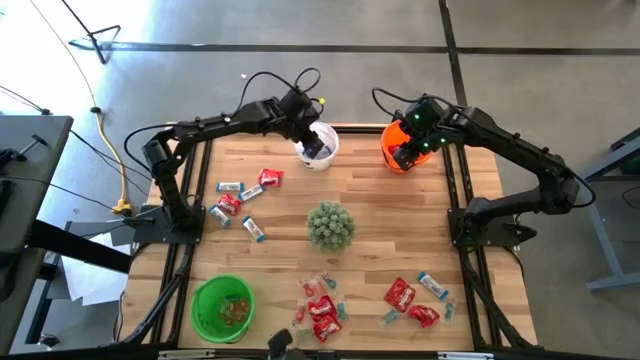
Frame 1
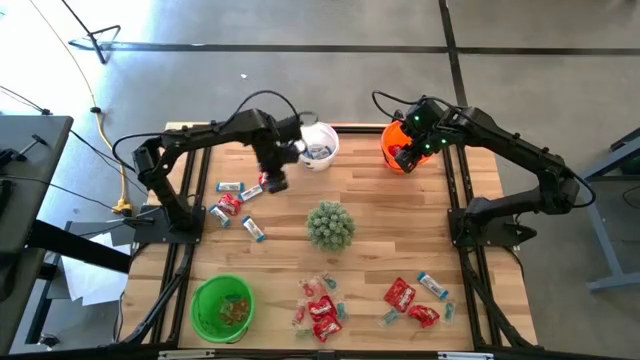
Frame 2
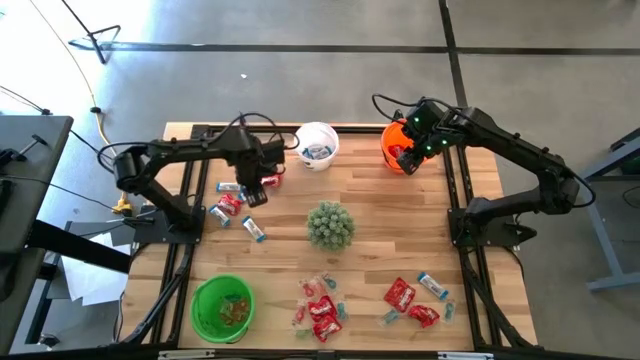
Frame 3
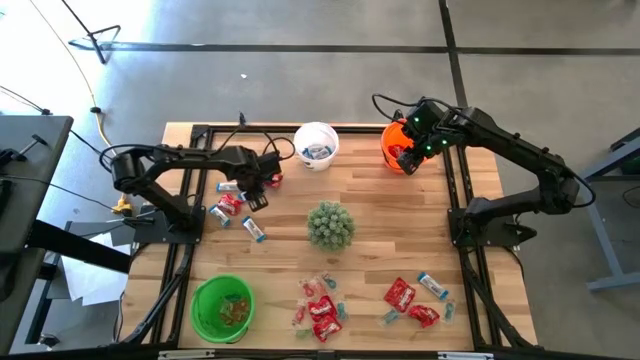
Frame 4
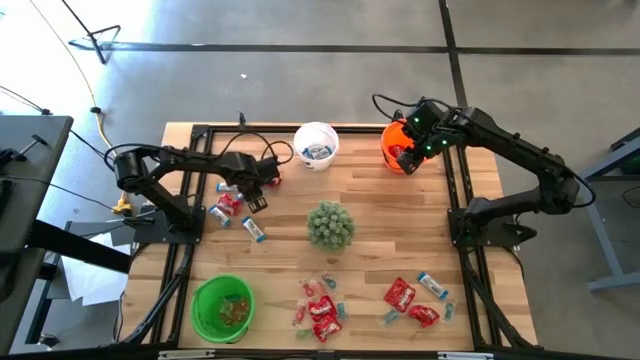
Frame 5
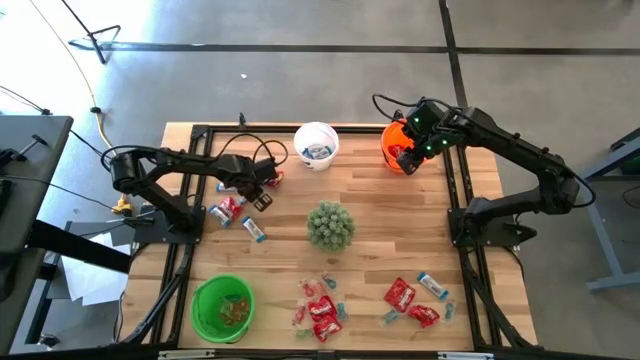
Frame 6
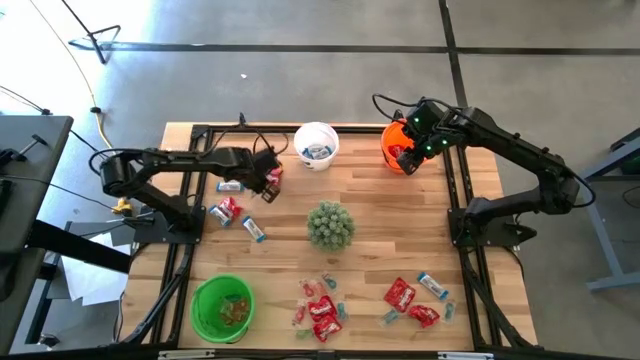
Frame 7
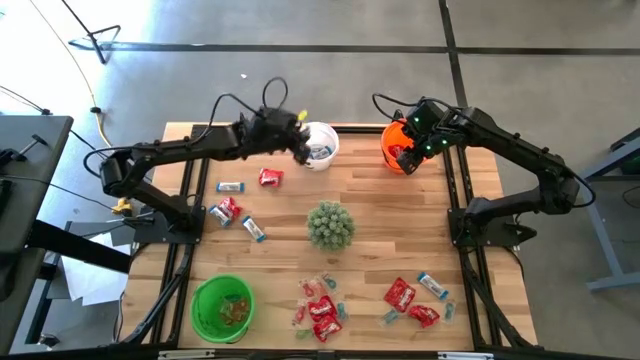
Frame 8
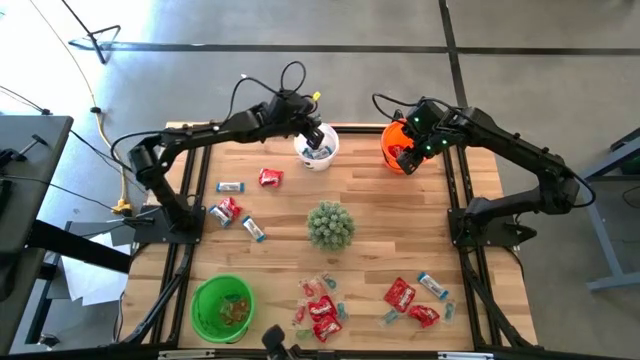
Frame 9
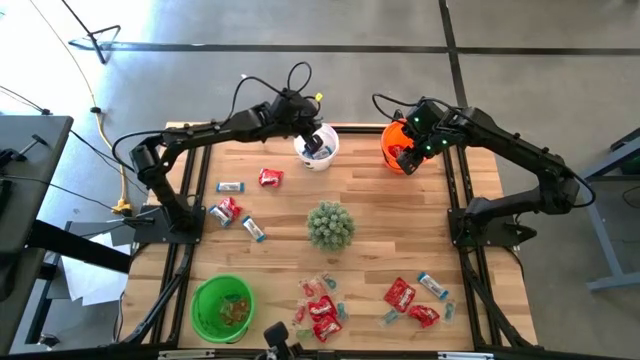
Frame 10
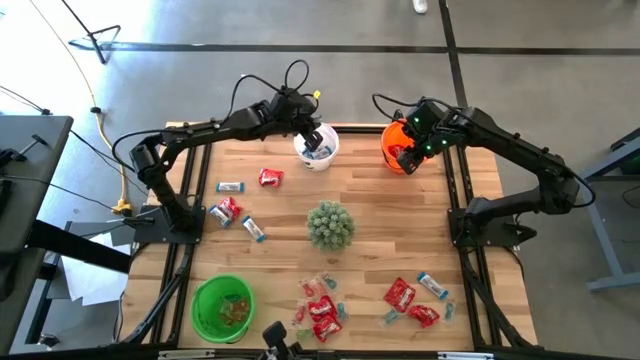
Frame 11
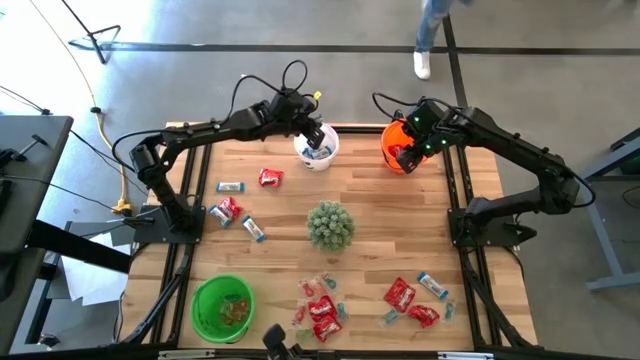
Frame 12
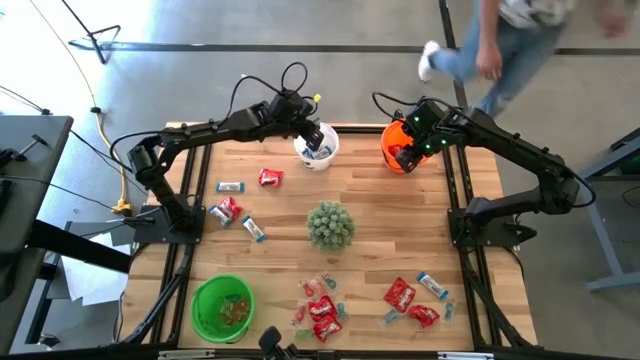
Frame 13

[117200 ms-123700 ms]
Task: Sort candy
Put the white chocolate into the white bucket

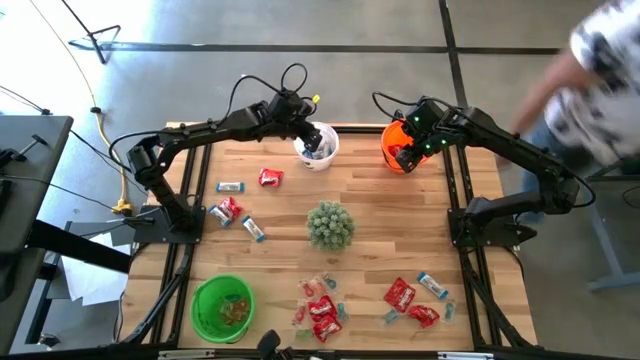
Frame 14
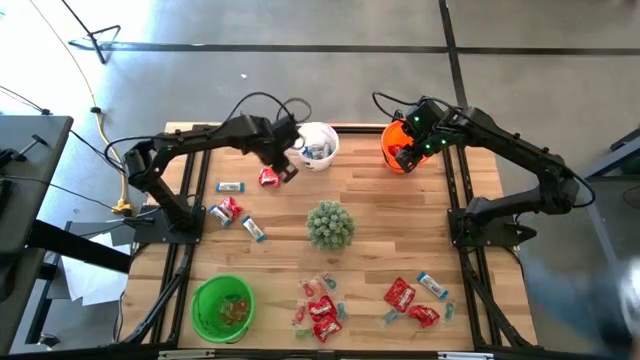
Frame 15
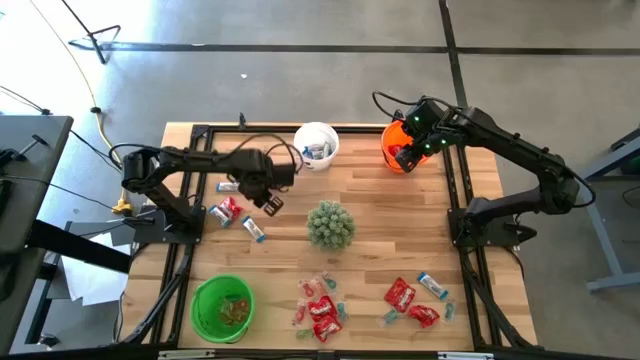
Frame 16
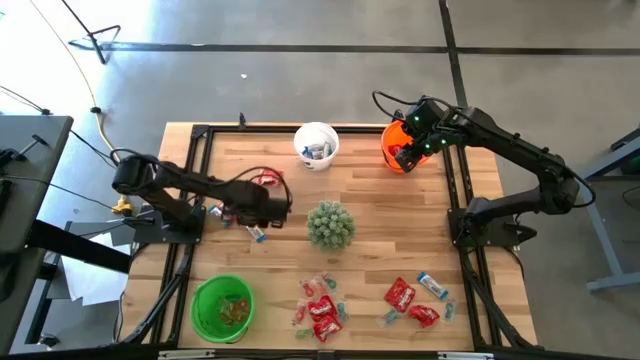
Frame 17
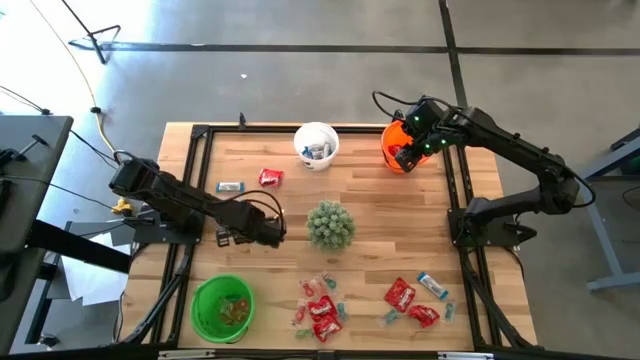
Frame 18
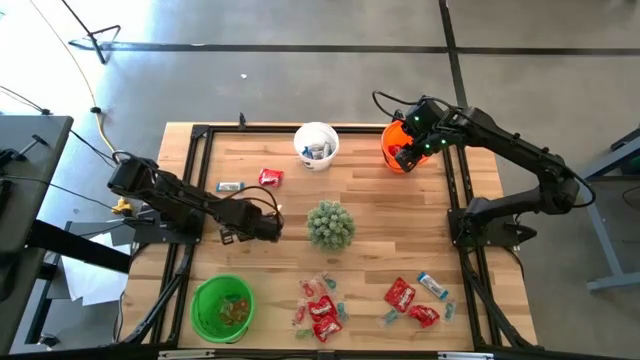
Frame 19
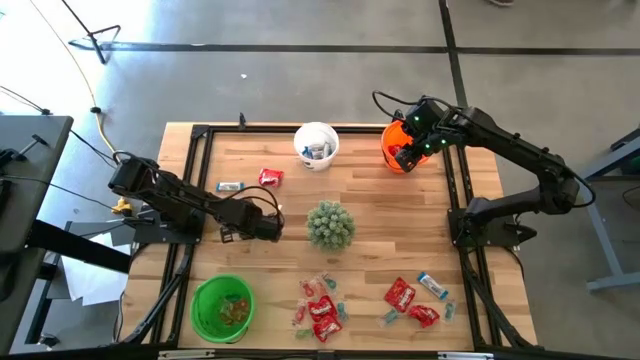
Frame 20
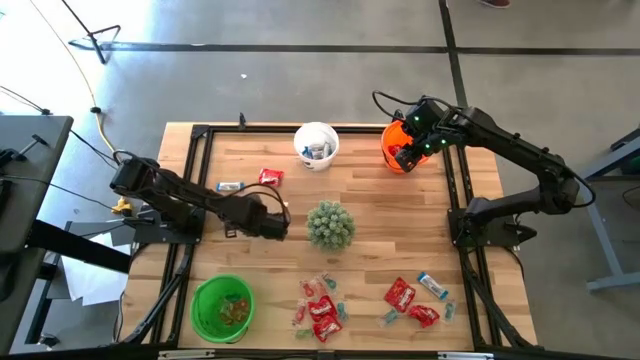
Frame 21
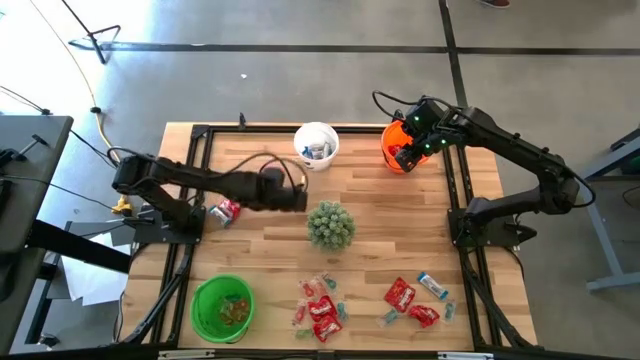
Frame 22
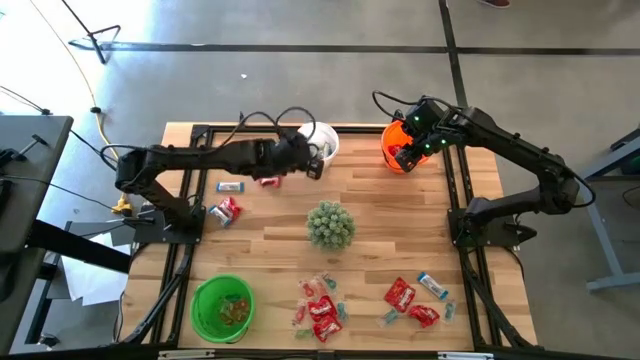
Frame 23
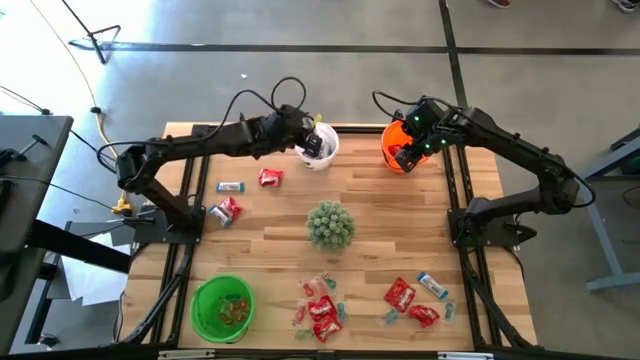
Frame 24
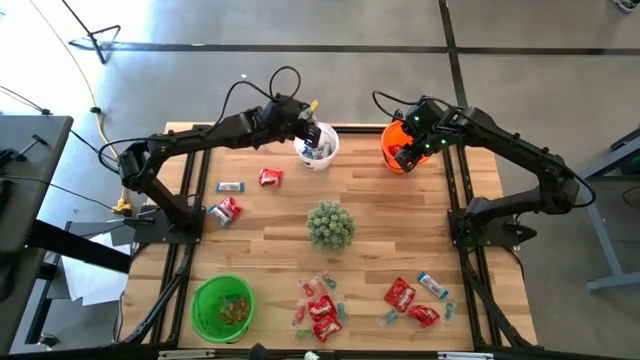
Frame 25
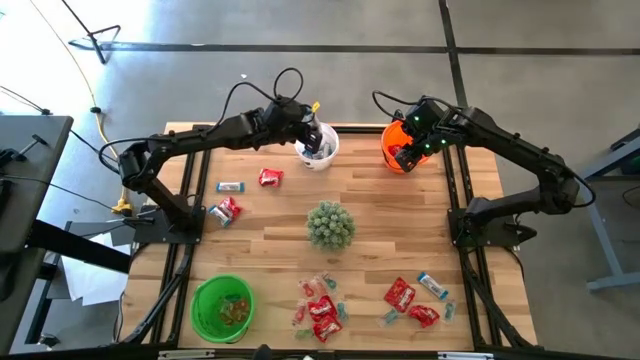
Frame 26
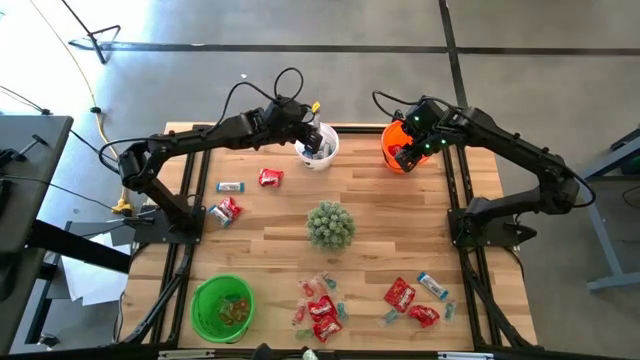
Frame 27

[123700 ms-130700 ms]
Put the white chocolate into the white bucket

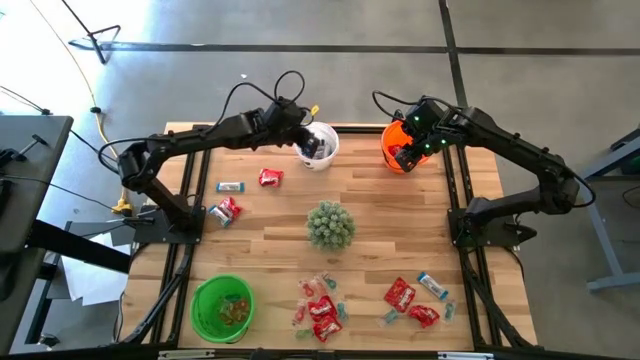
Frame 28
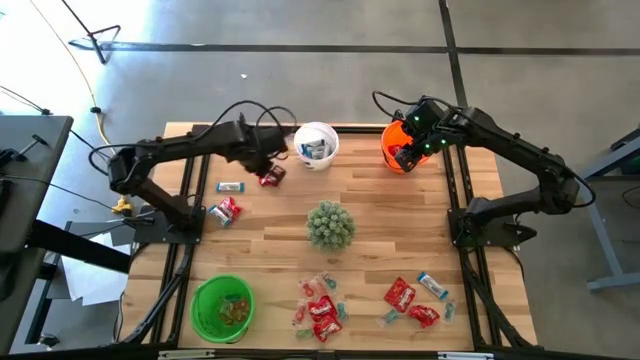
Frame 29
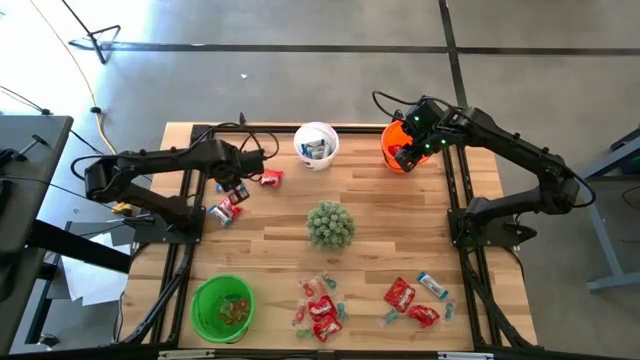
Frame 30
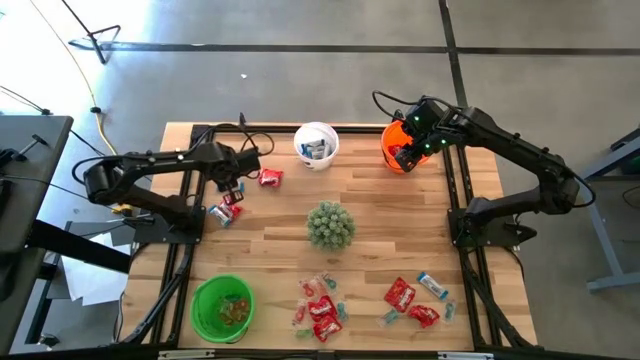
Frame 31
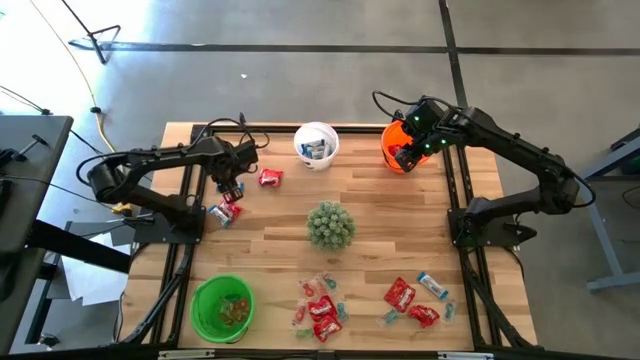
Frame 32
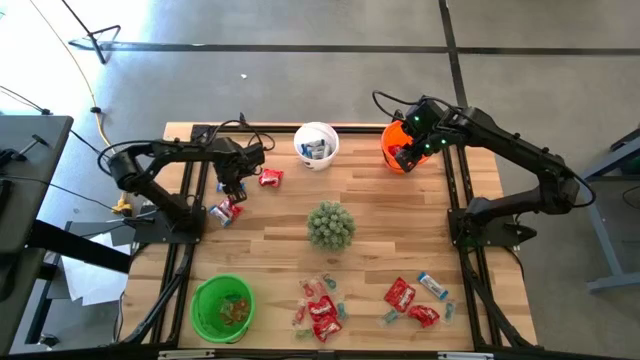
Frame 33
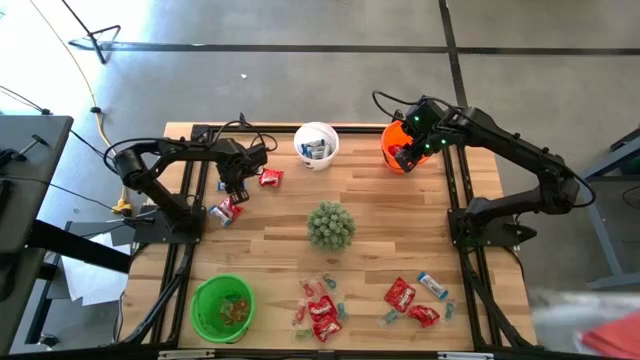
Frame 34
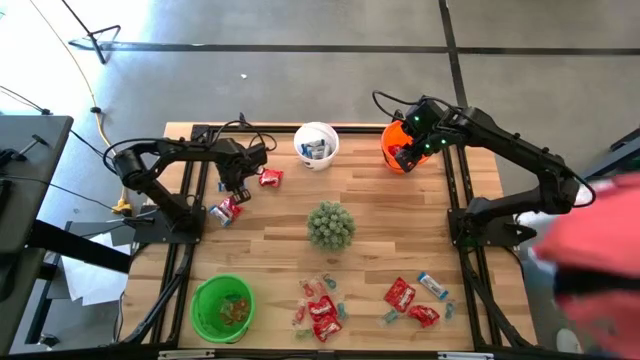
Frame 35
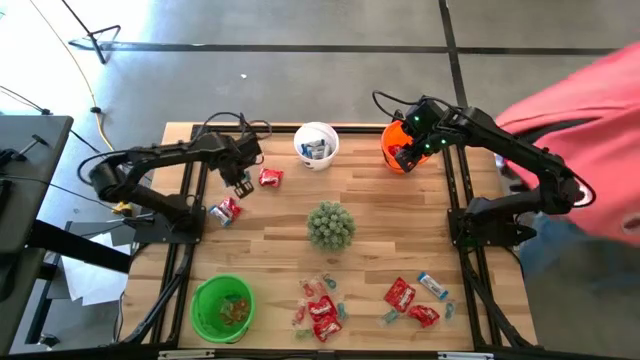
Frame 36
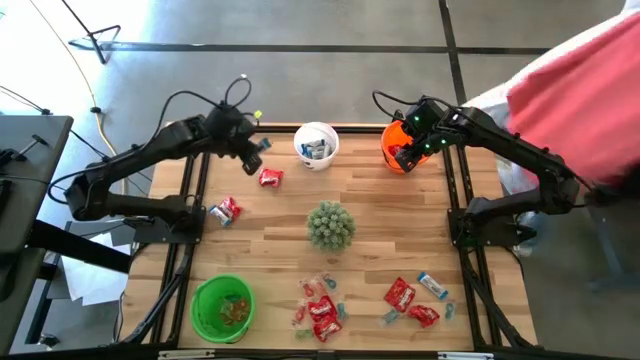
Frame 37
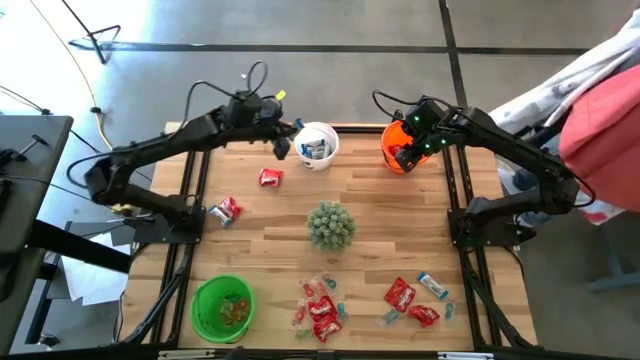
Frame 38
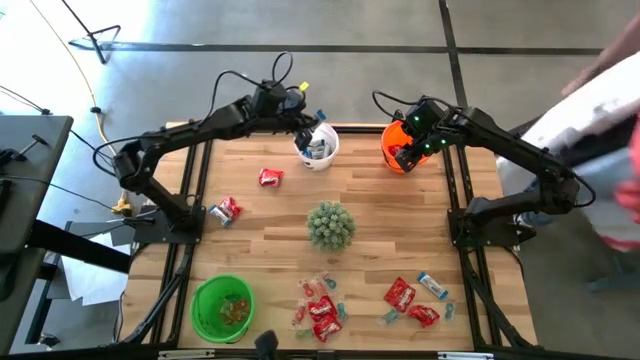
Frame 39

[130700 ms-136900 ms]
Put the white chocolate into the white bucket

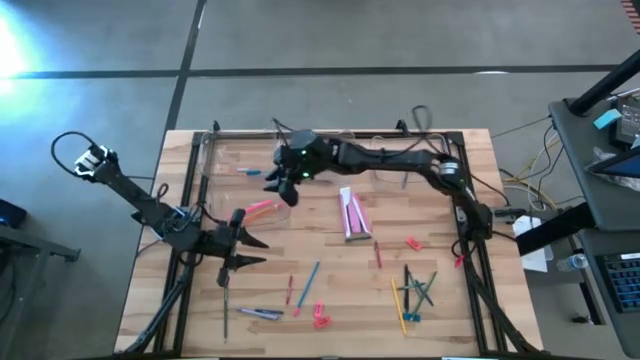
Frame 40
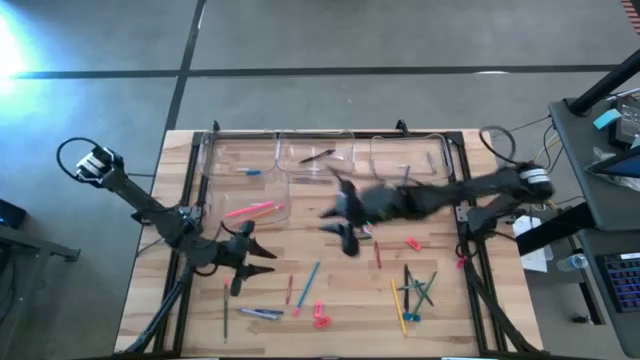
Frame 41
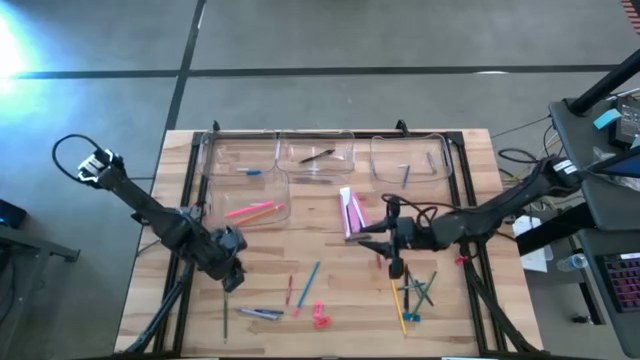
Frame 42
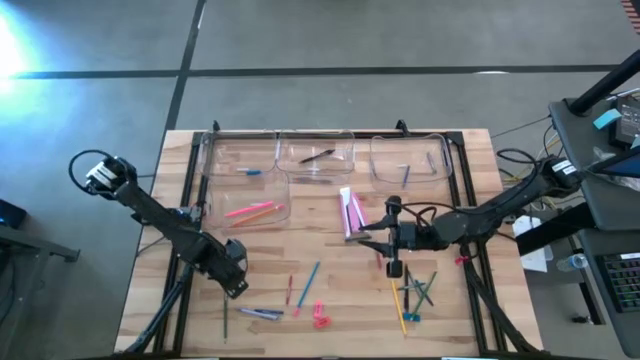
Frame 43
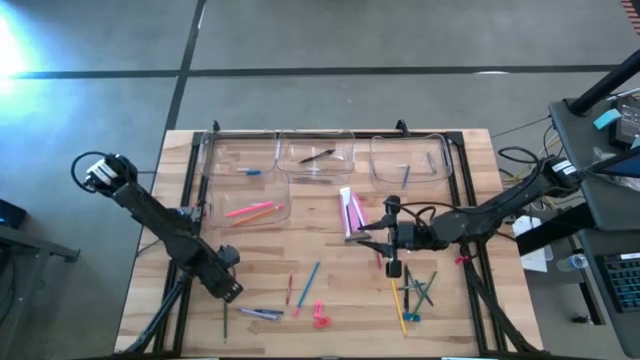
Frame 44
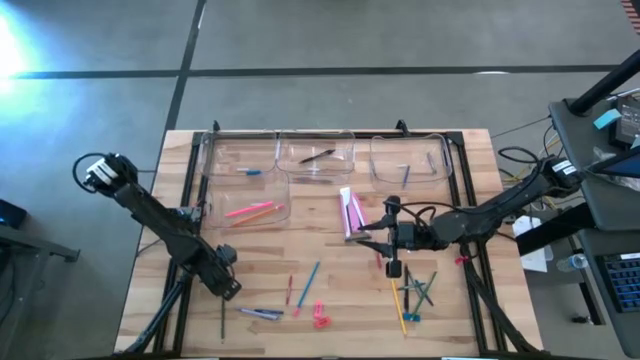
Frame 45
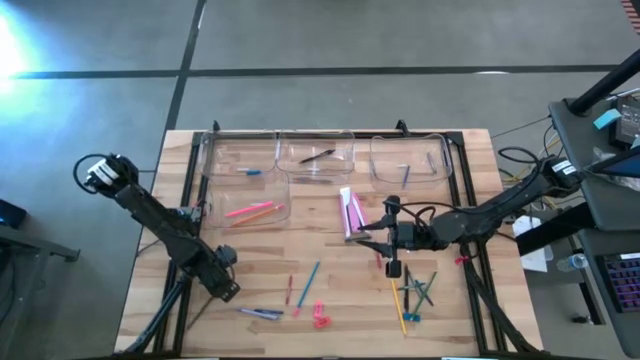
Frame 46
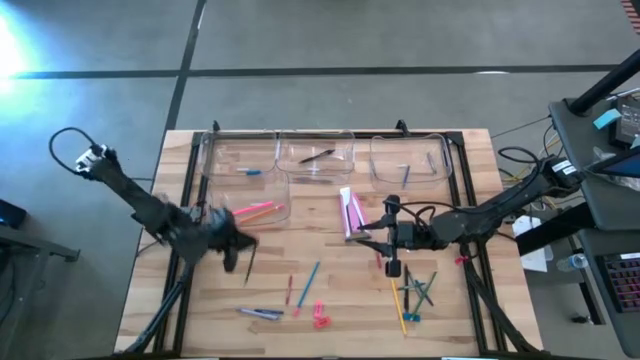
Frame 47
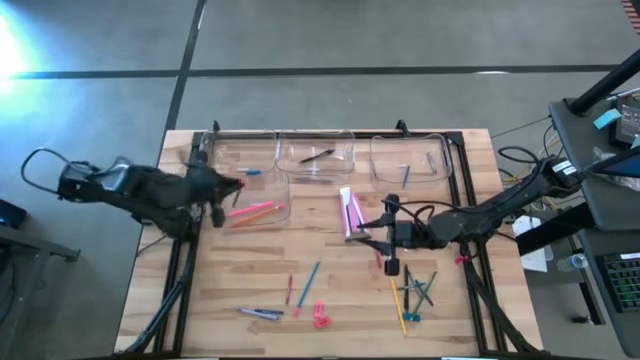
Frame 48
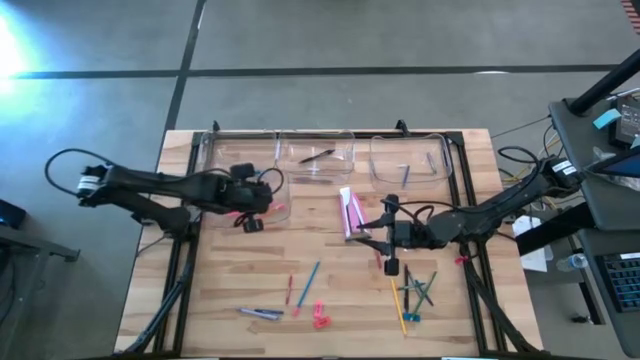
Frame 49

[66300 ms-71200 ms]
Task: Sort crayons/erasers/pens/pencils in bins
Put the green pencil into the bottom left transparent bin
